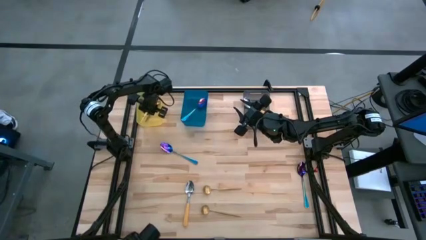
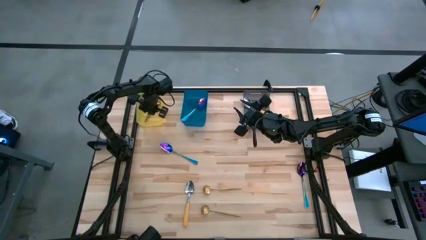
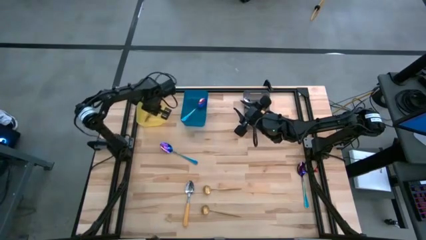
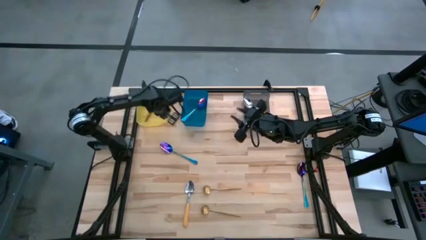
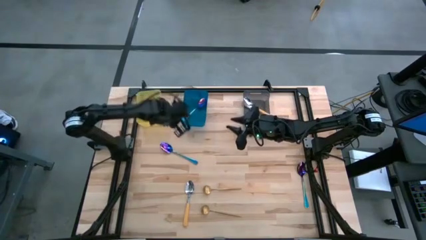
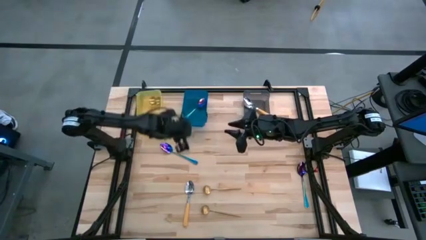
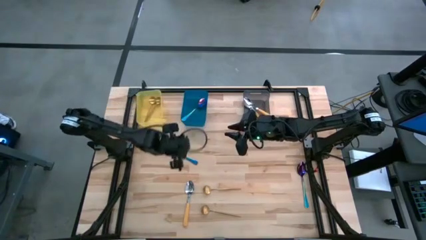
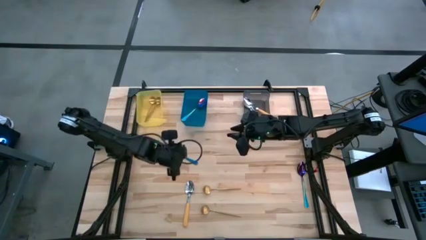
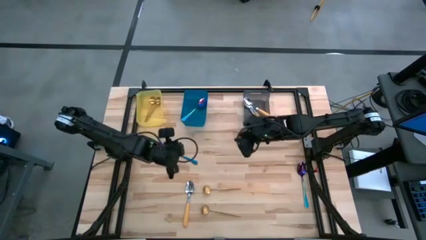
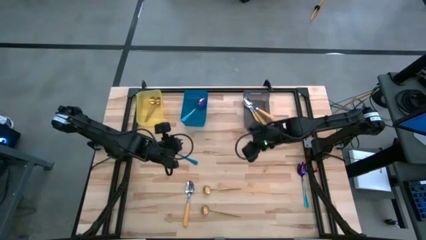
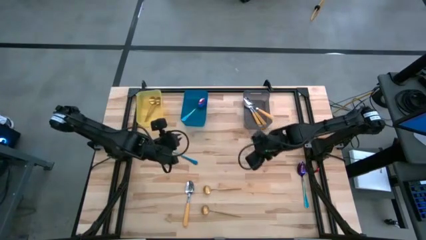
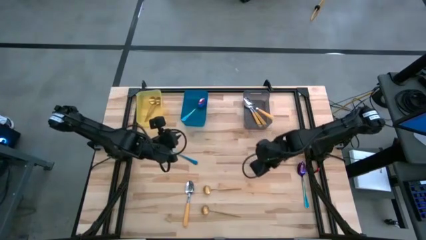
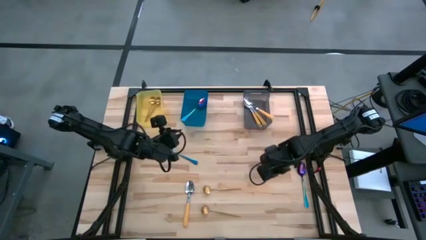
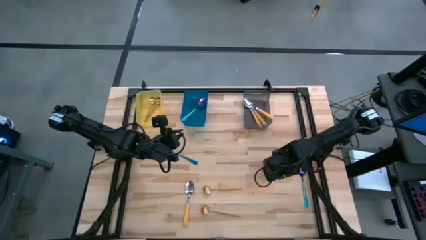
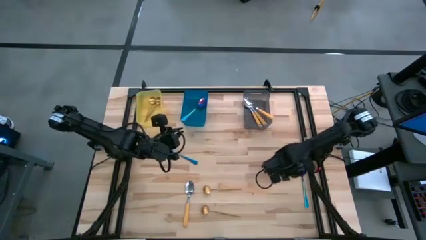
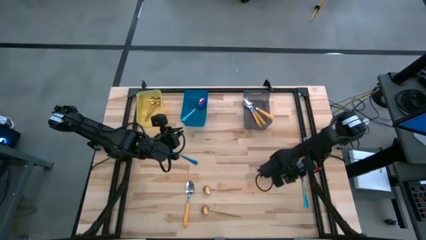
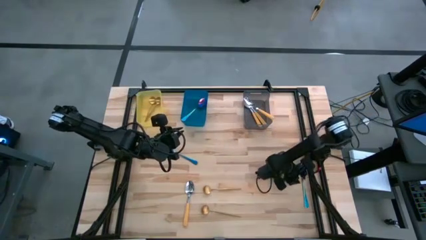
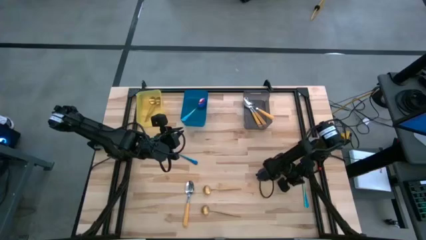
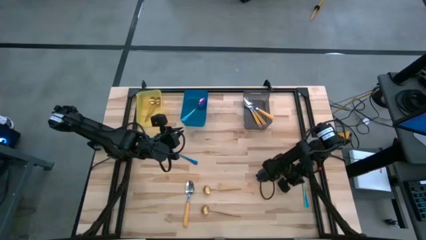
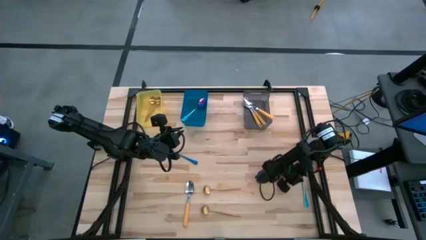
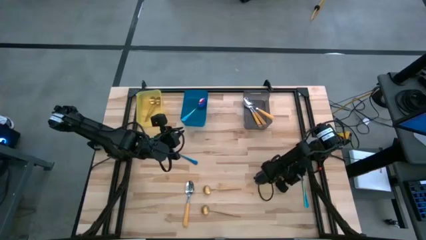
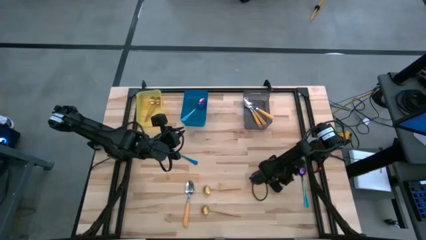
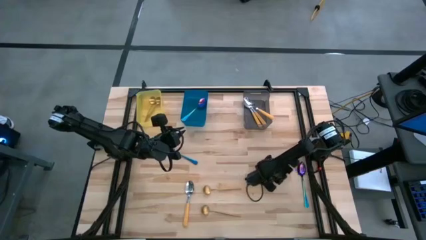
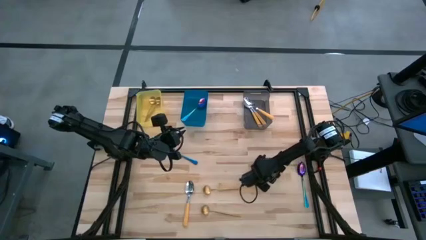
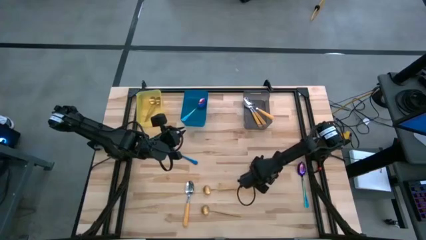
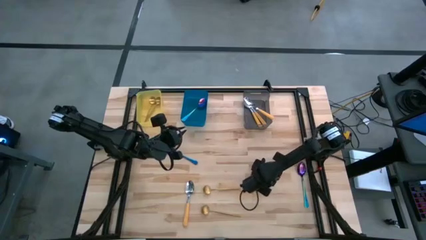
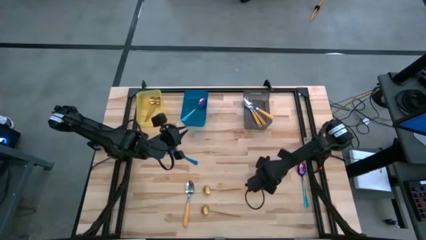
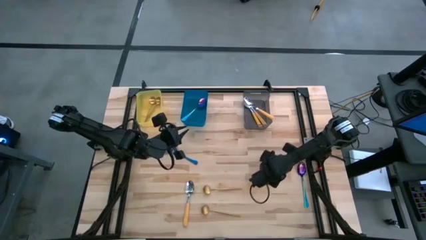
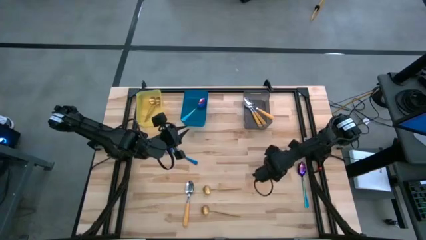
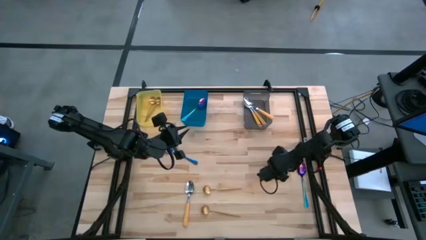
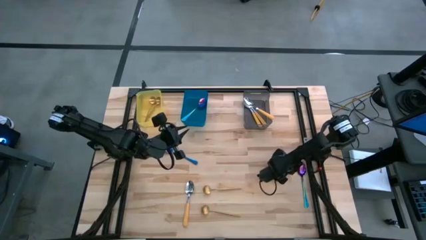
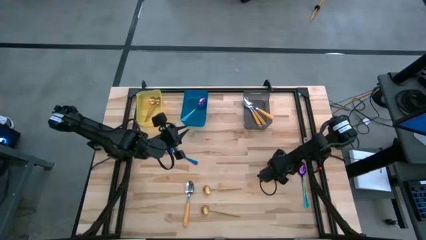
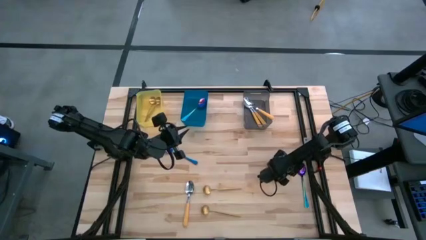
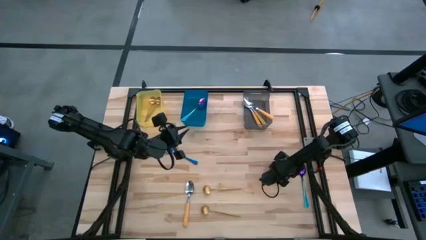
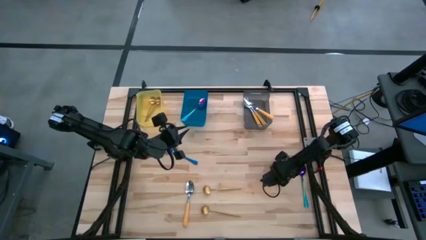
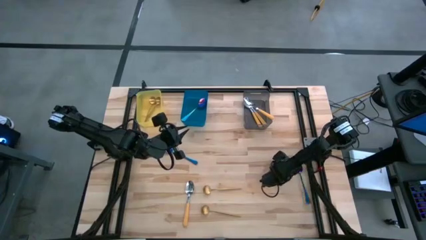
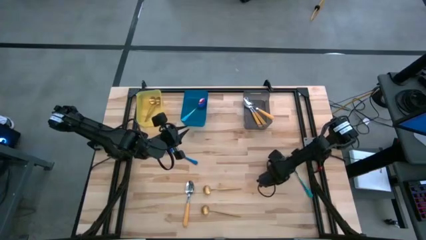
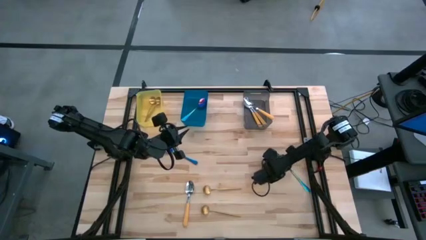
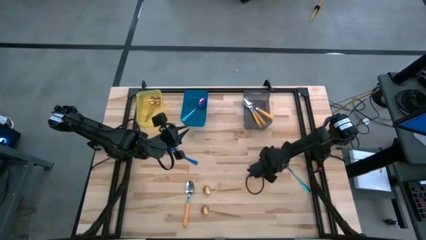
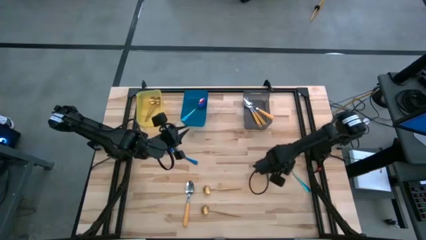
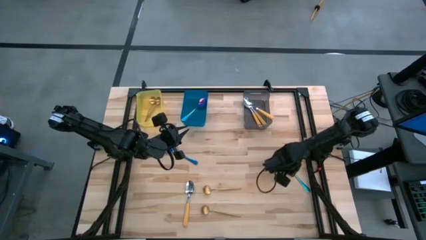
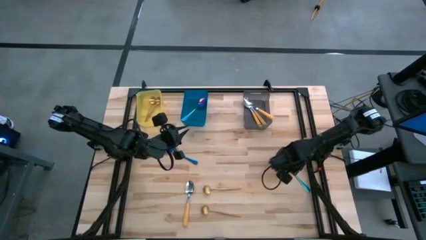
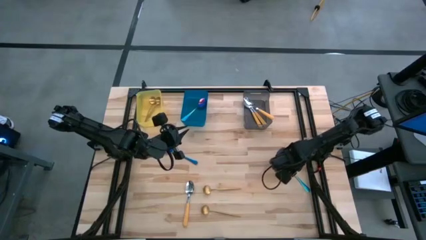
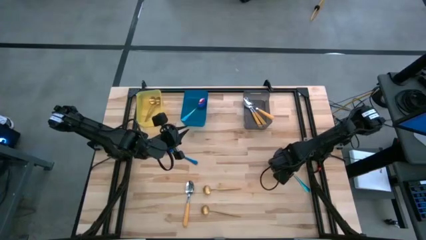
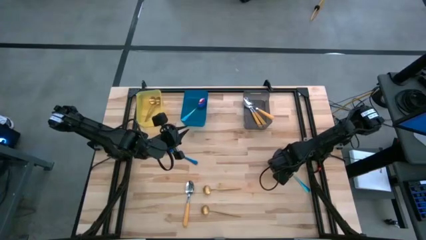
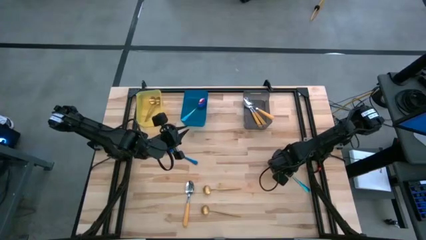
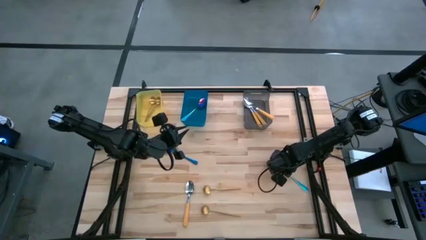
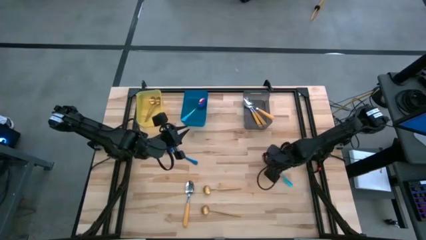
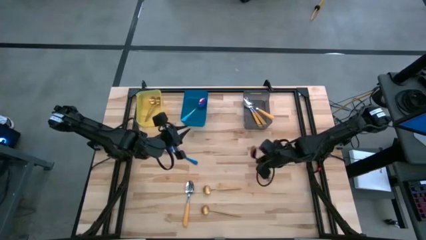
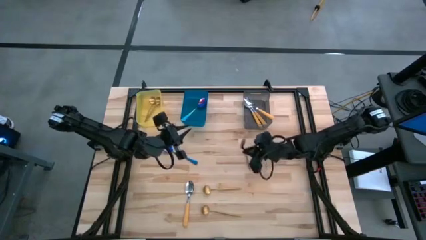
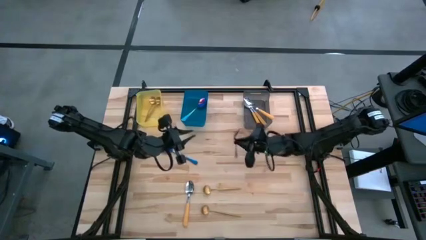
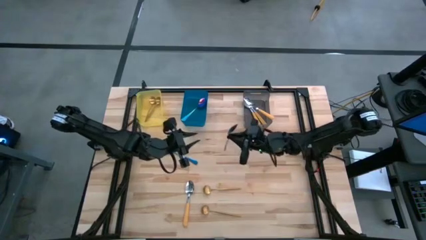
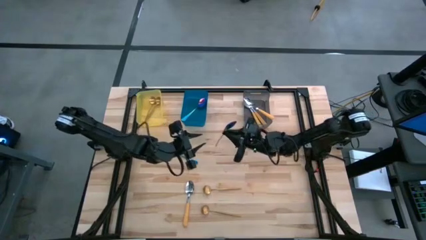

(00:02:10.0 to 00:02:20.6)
Task: Sort silverware by color (type)
Put the blue spoon into the blue bin

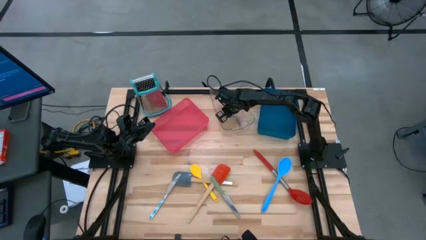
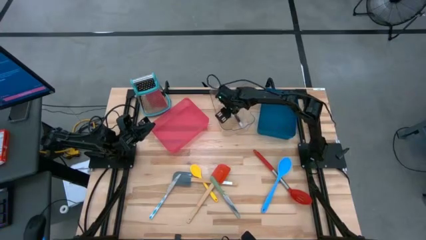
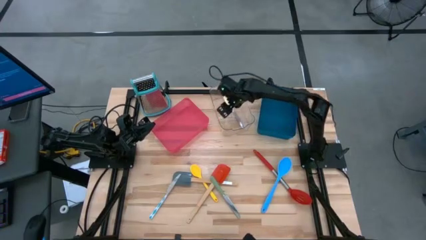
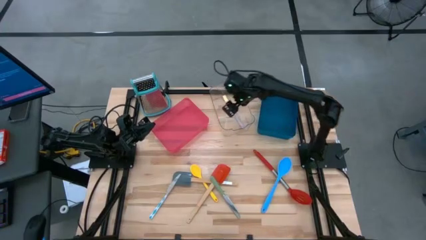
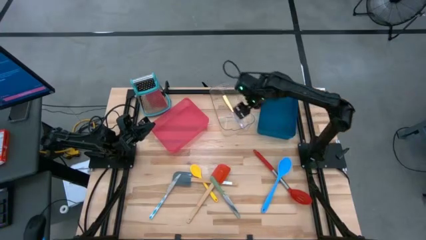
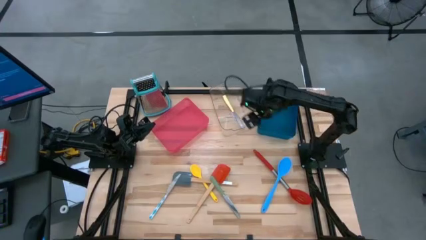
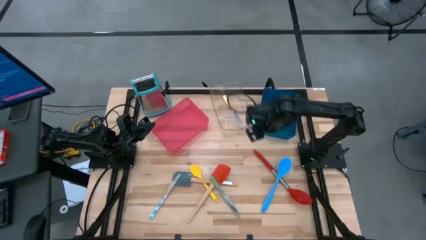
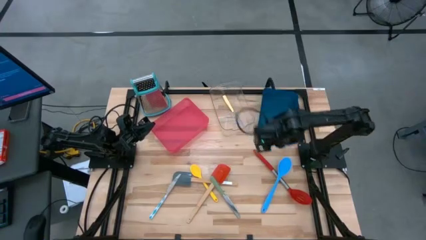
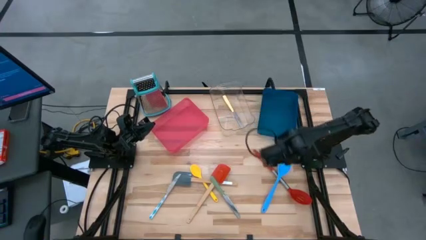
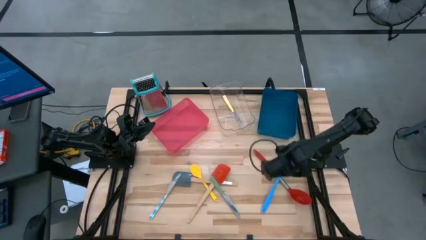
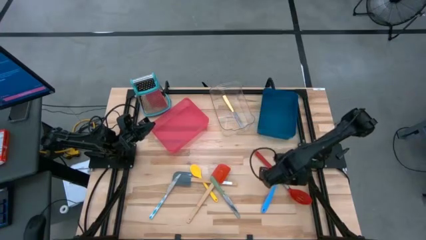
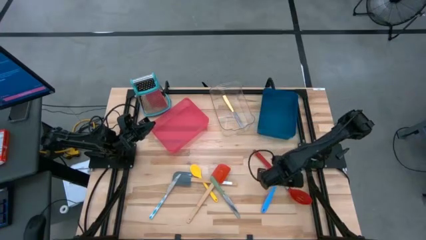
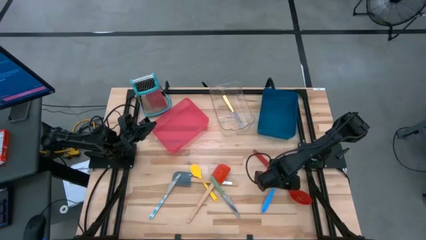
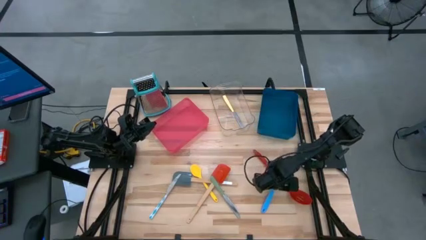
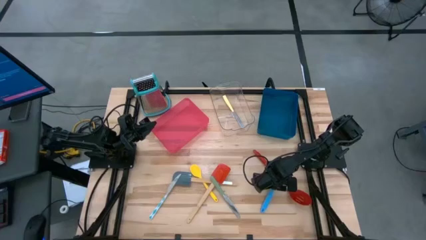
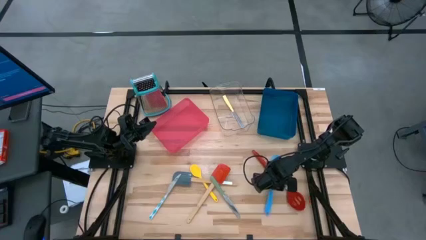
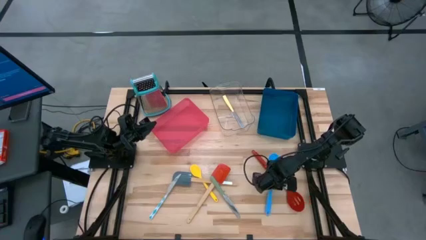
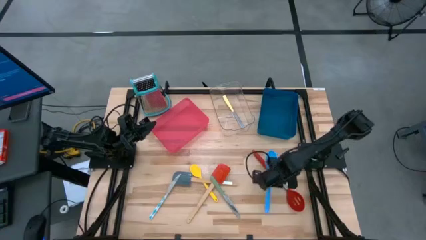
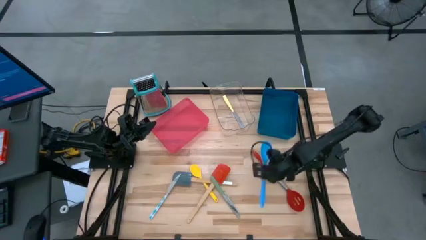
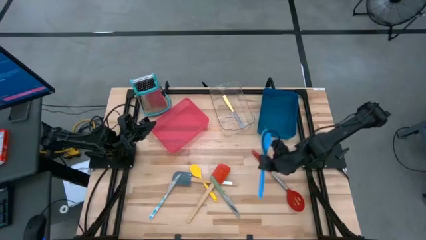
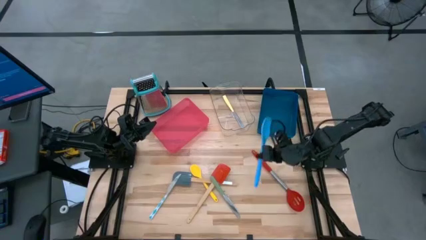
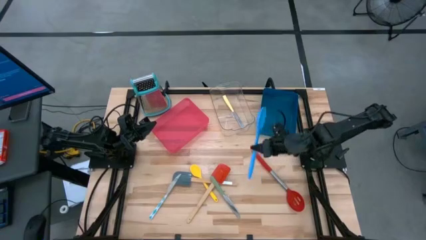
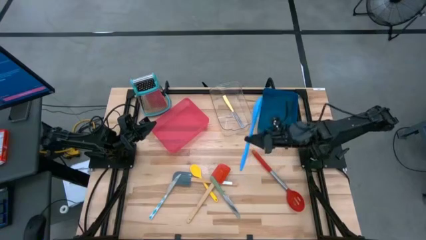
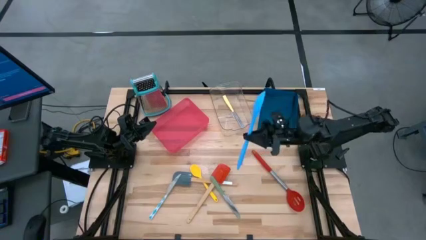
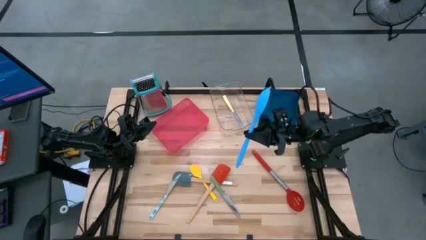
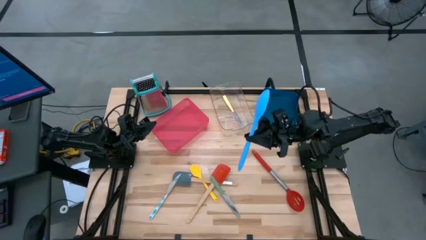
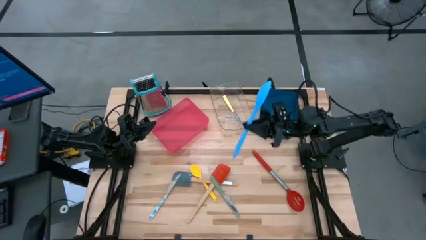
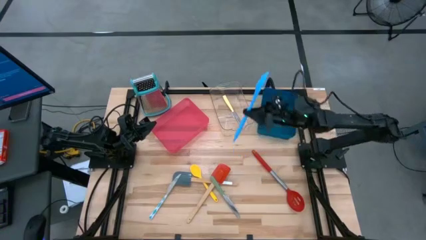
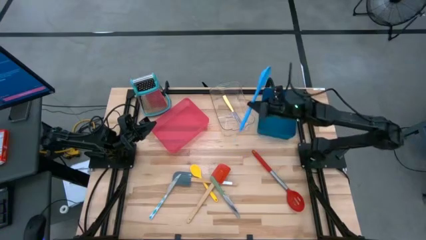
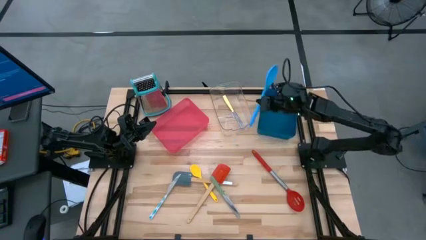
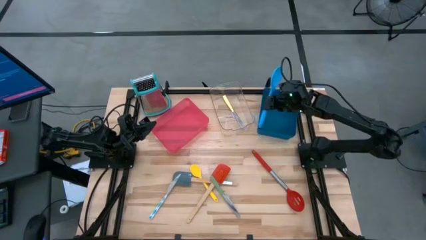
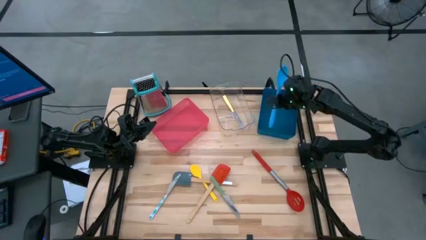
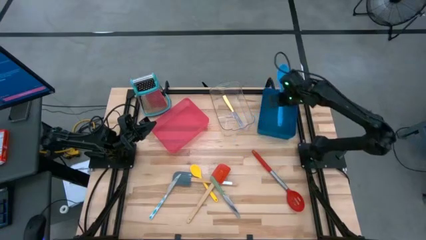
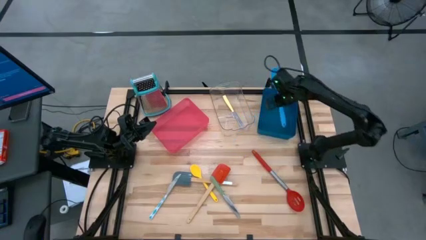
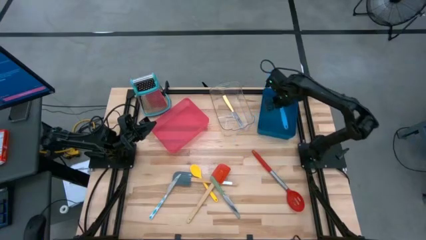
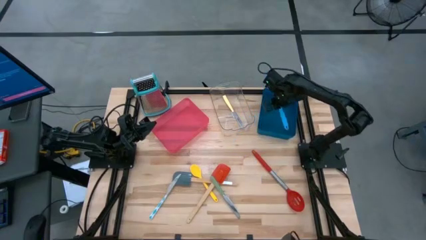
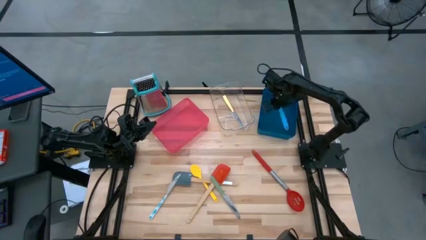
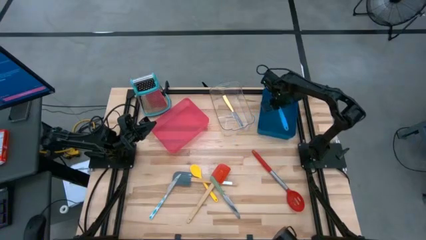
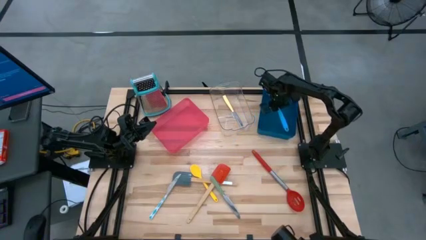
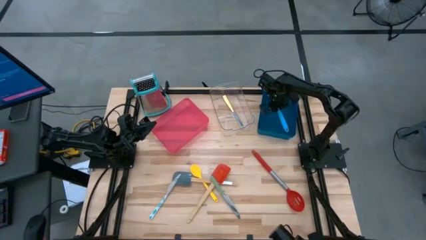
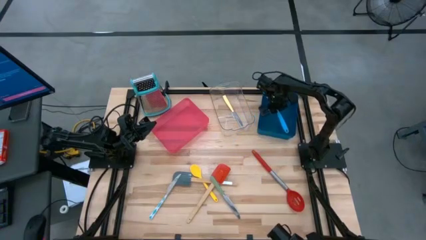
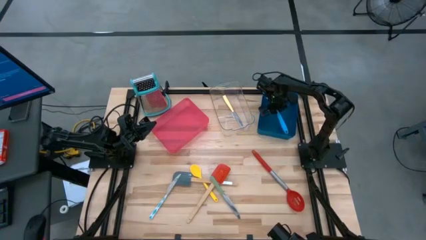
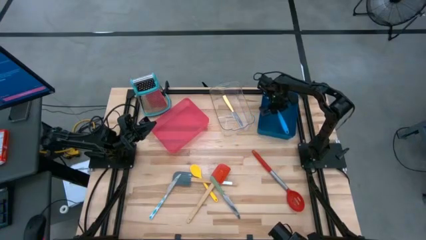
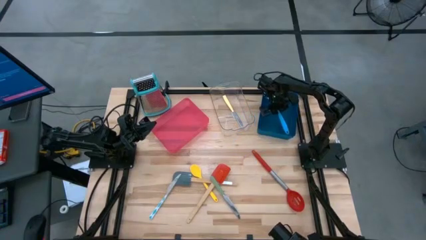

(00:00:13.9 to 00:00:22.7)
Task: Pick & Place Kitchen Items
Put the blue serving spoon into the blue bin
